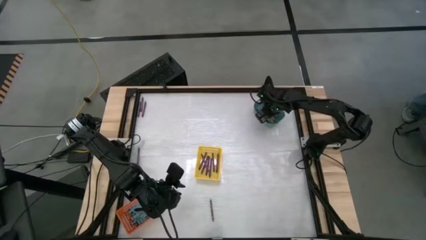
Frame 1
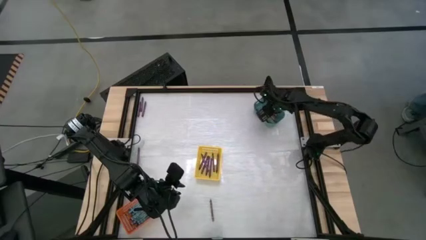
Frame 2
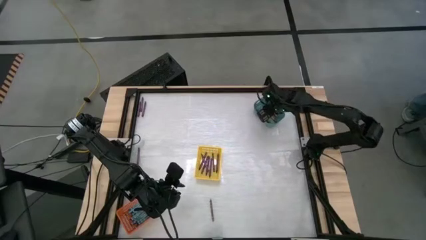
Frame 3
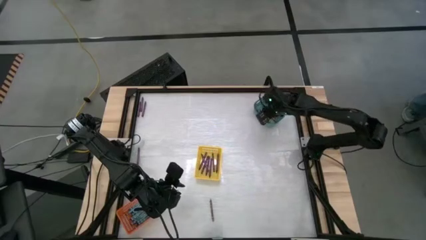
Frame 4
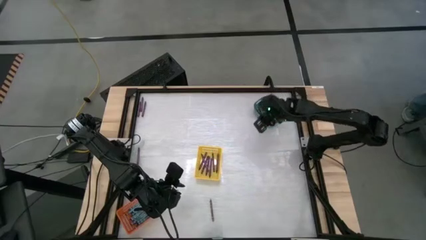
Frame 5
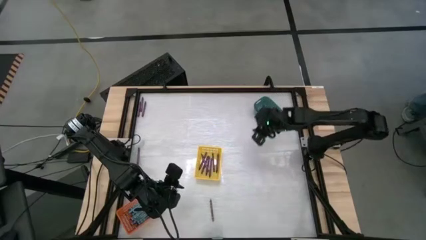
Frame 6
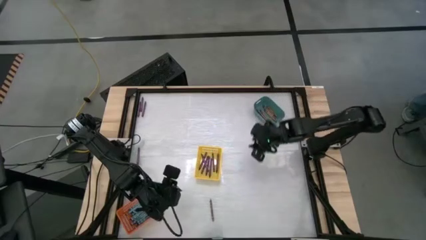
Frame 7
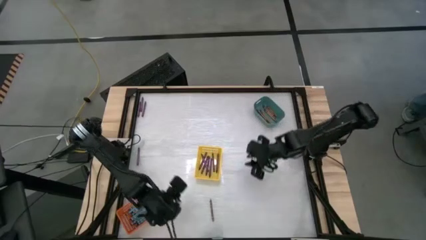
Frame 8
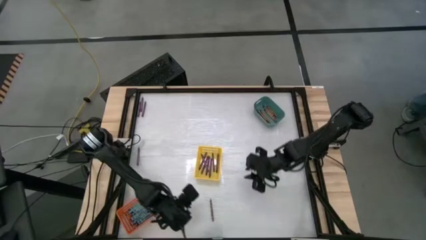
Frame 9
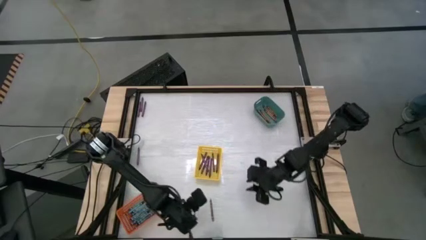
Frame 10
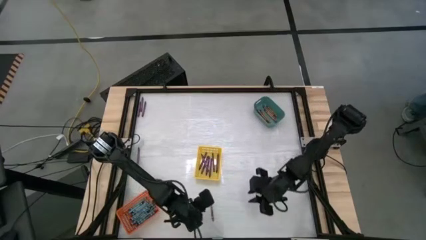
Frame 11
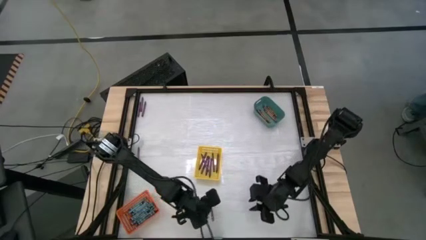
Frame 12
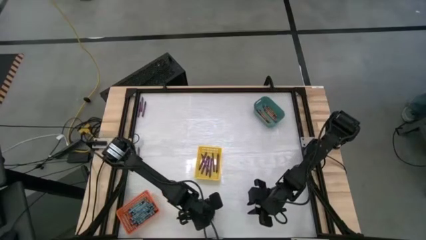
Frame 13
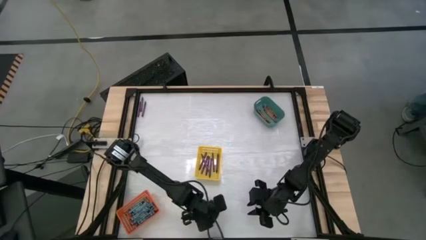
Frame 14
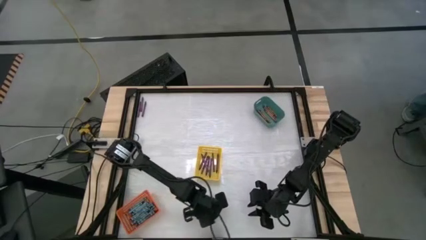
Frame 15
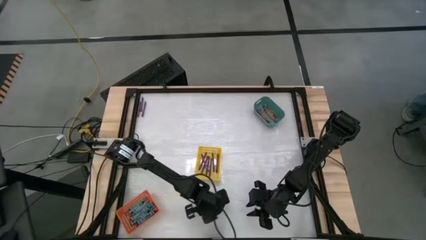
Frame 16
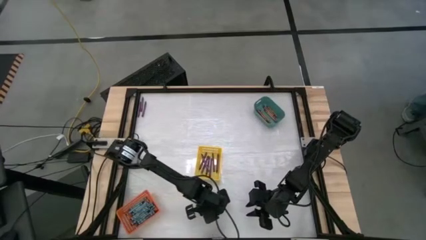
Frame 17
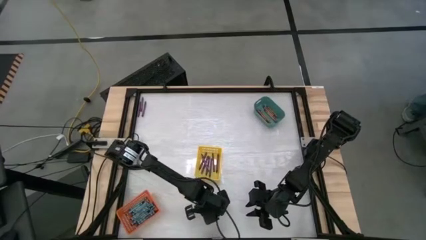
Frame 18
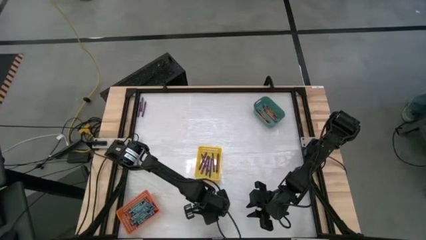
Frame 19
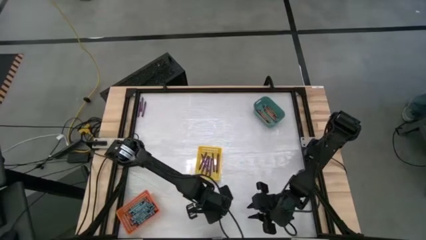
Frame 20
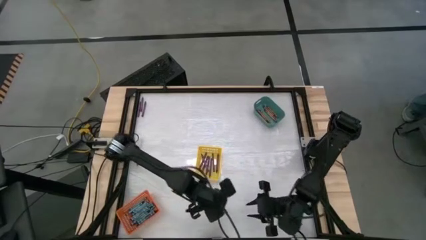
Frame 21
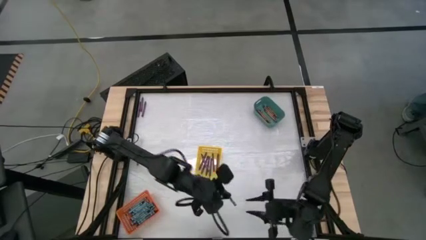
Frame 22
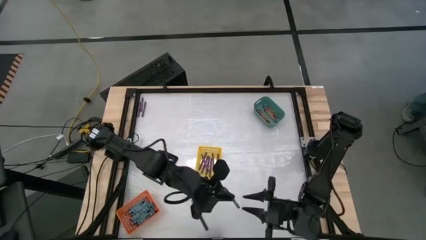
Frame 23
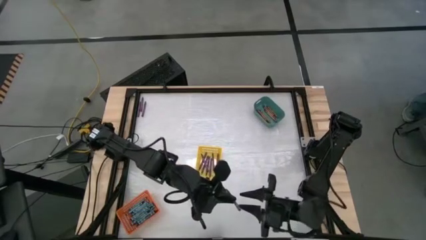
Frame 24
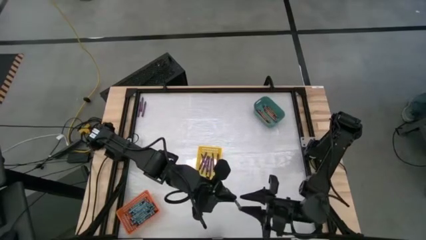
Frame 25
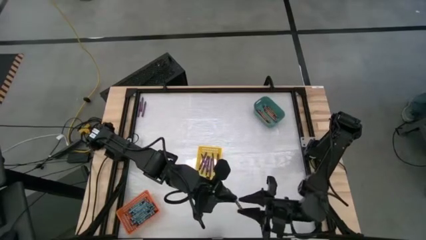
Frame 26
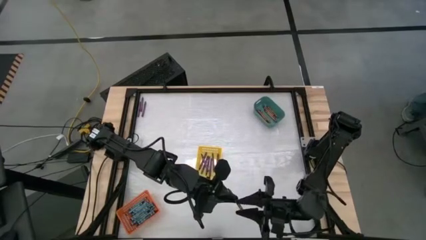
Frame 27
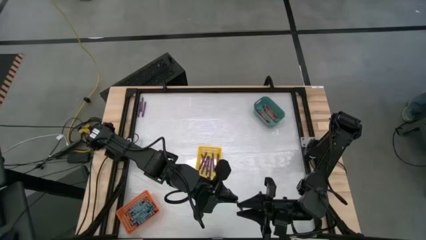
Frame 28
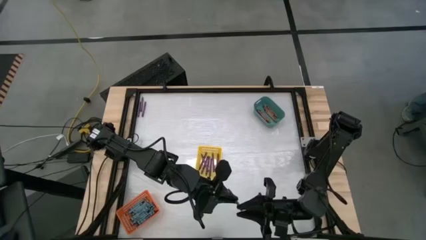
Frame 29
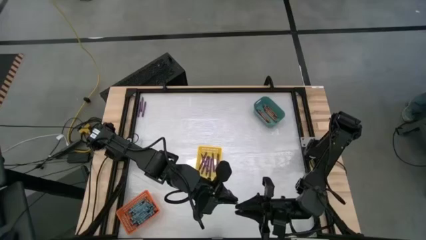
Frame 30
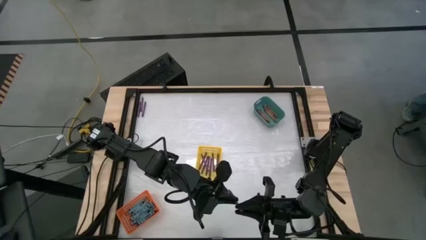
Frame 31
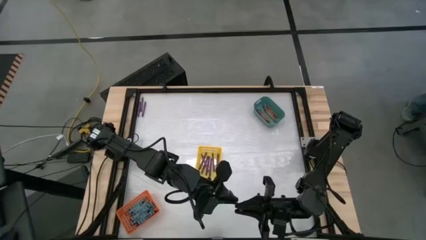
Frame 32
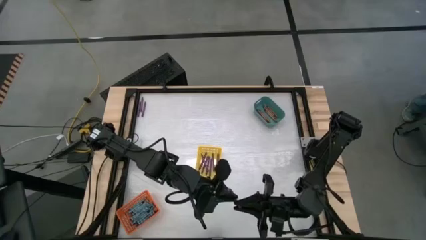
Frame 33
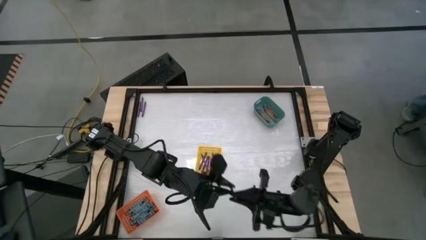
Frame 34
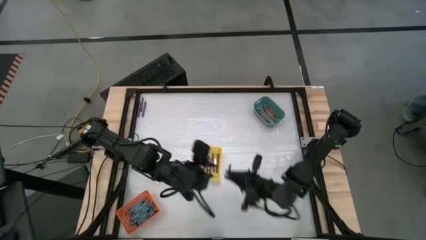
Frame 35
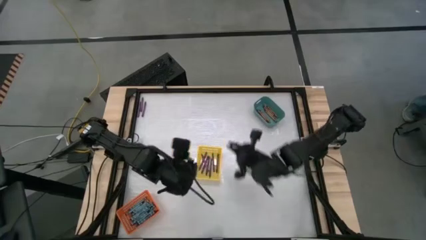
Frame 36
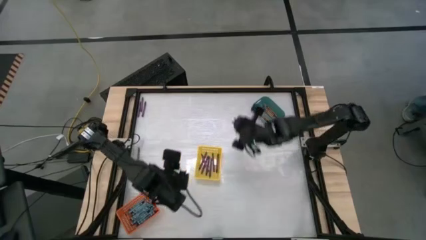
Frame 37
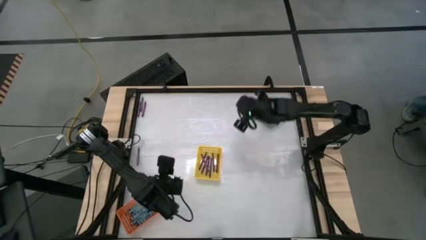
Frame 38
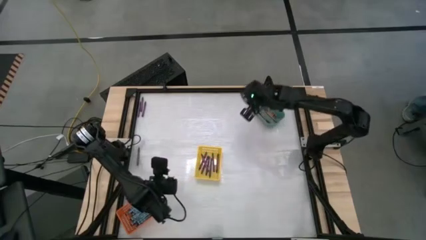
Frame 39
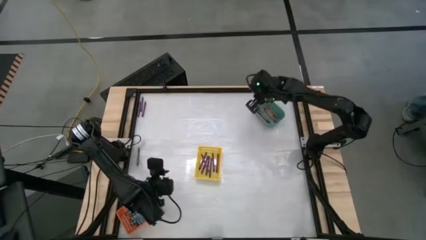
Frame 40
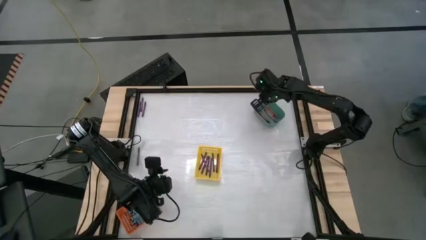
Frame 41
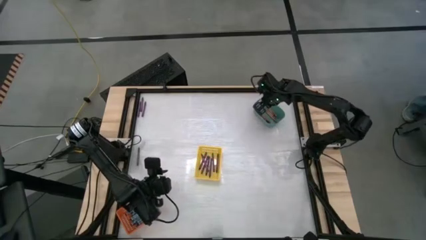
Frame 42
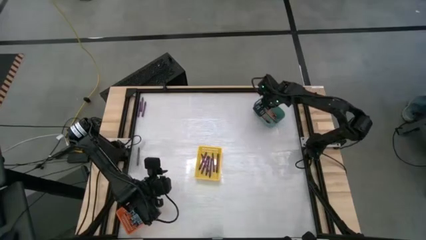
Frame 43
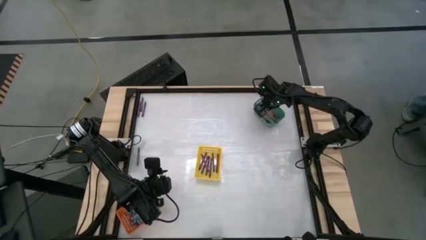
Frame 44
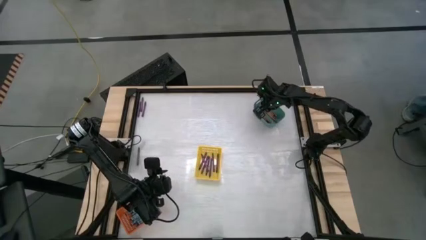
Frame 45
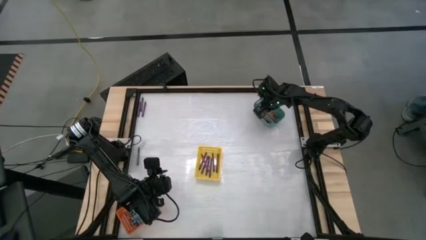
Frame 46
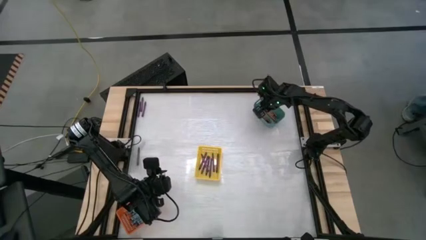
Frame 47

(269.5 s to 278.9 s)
Task: Sort crayons
Put the brown crayon into the green bin

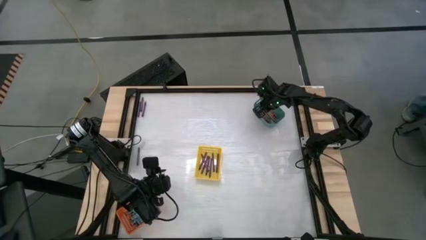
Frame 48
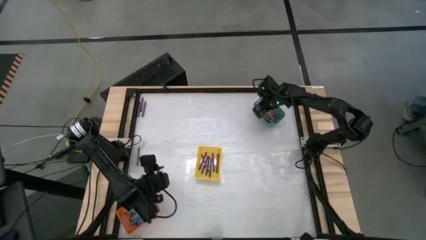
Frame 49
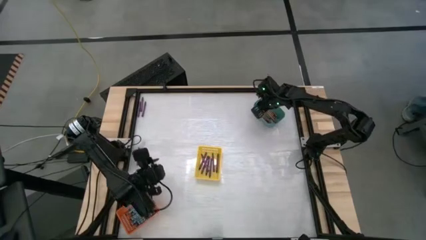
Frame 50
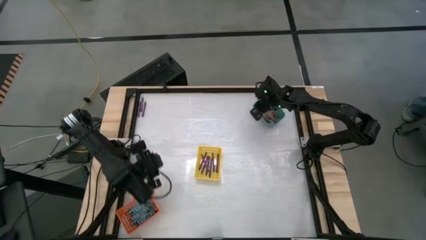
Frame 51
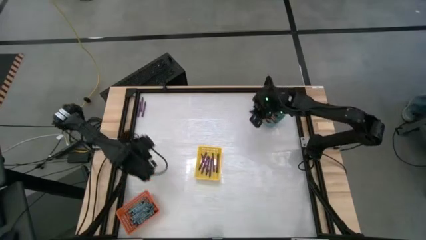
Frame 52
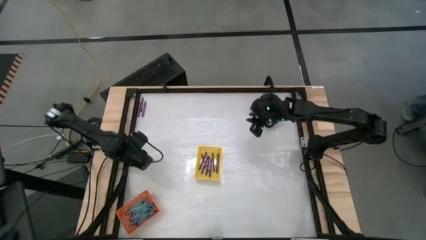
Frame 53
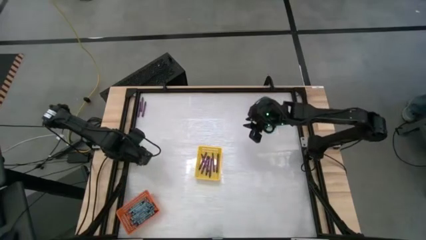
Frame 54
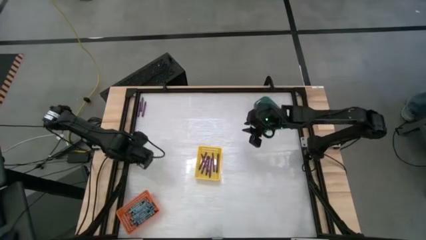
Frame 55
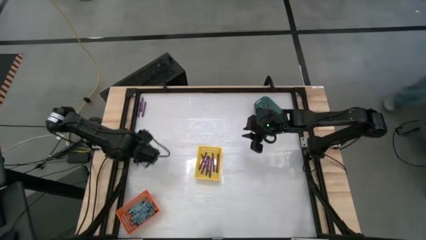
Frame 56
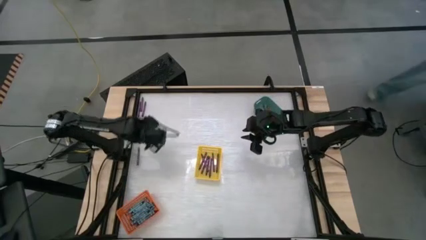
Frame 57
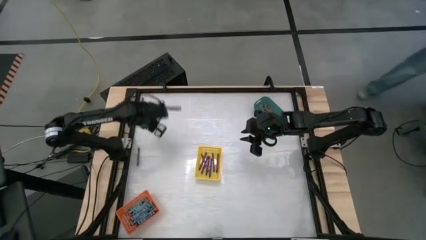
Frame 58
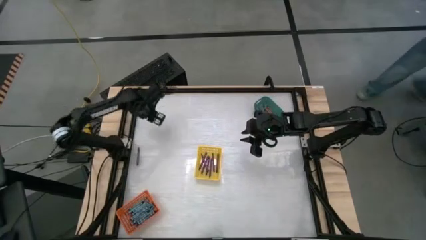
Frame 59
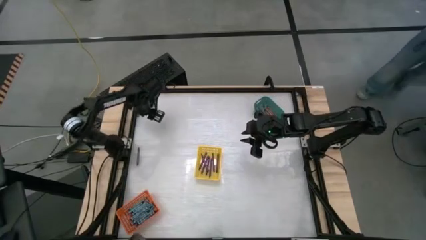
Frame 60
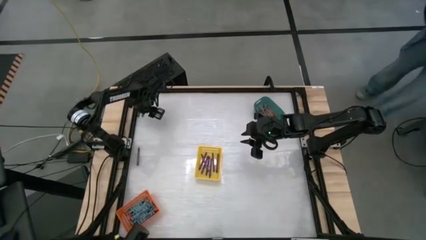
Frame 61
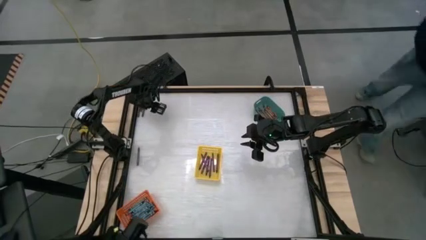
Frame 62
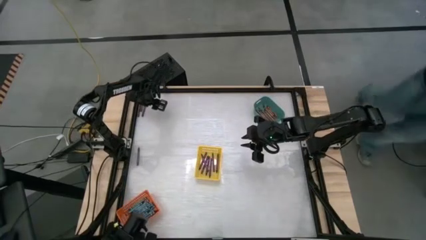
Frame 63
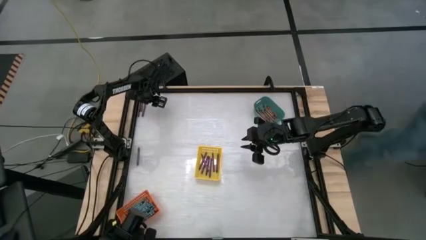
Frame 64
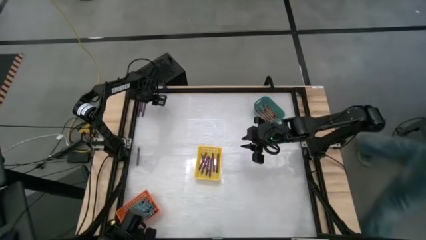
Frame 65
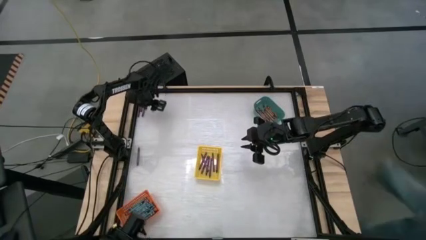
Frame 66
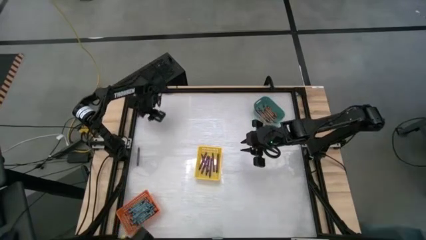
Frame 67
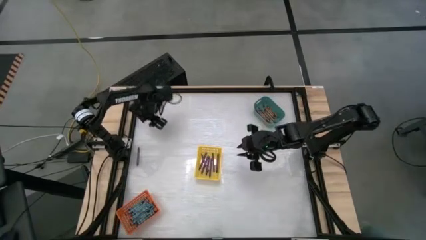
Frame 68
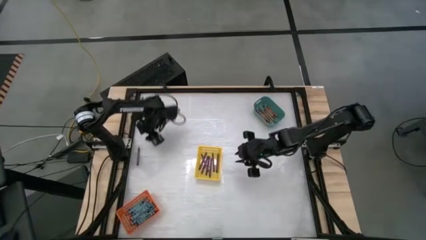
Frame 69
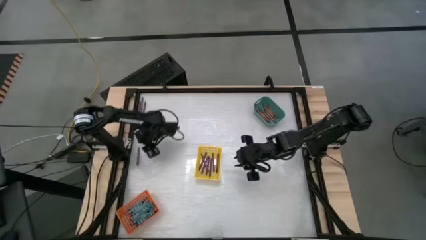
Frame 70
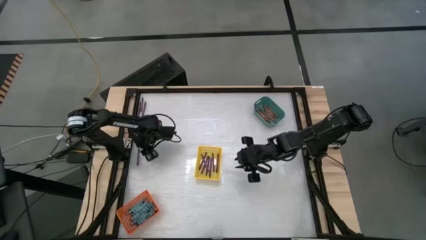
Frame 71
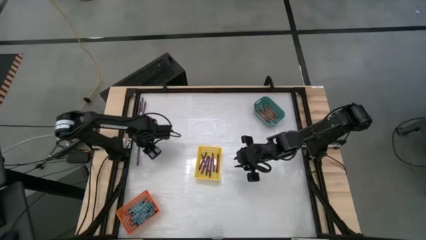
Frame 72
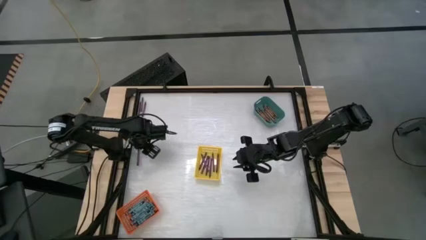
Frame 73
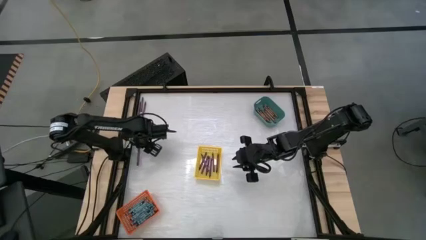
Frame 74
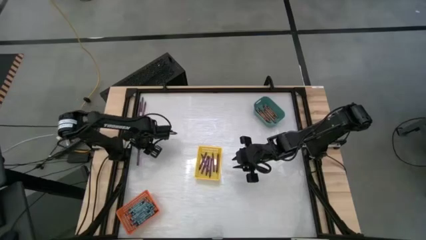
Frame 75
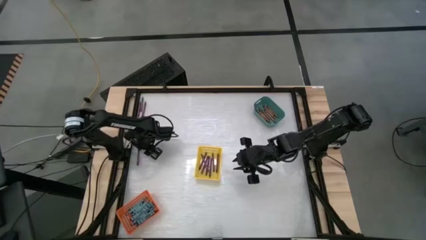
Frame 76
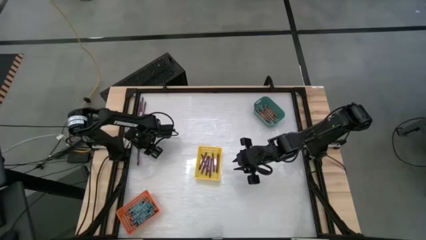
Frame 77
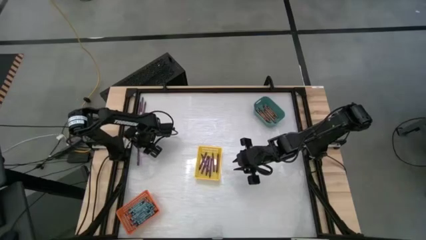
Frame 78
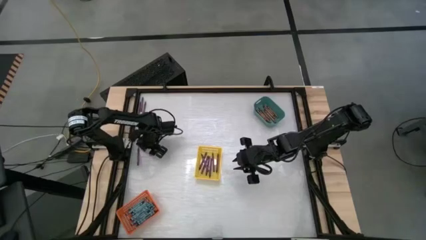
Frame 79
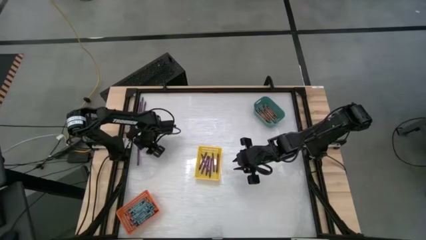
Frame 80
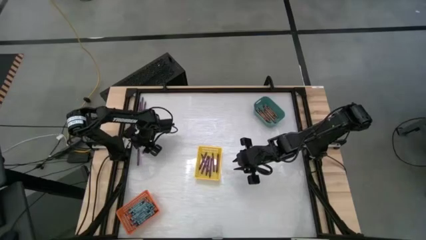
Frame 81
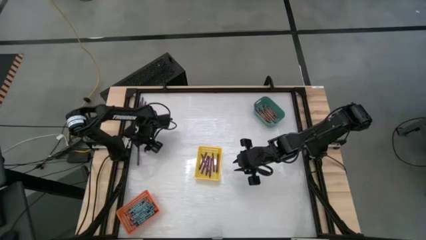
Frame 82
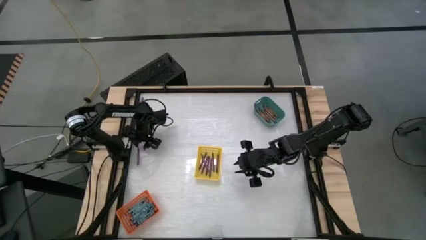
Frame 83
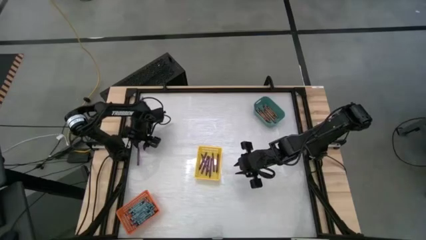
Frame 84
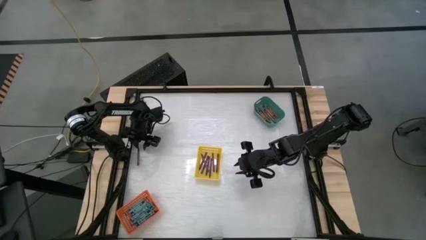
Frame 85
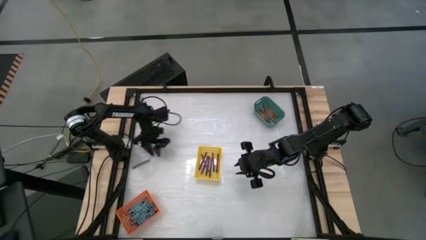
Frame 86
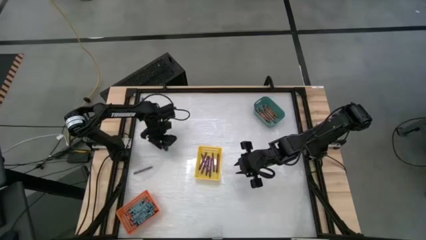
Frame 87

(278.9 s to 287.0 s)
Put the violet crayon into the yellow basket
